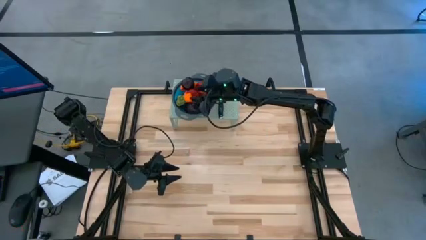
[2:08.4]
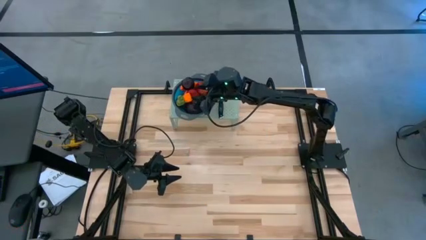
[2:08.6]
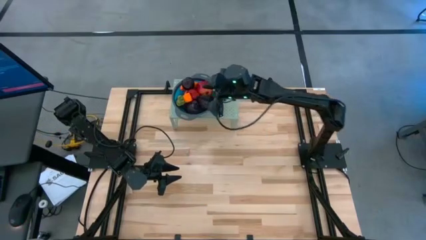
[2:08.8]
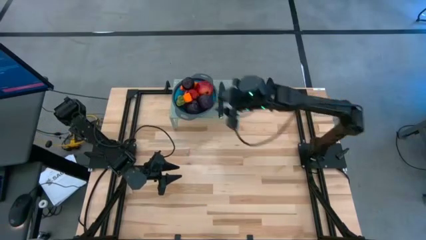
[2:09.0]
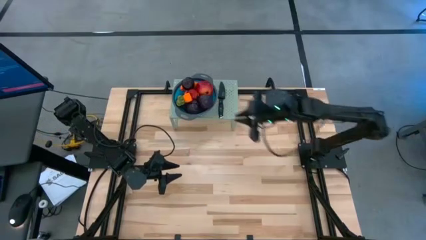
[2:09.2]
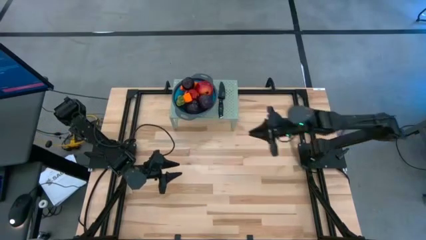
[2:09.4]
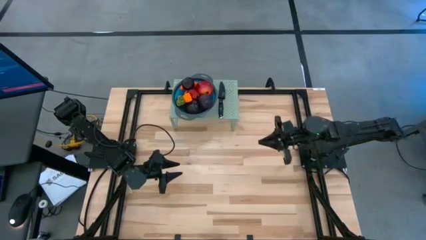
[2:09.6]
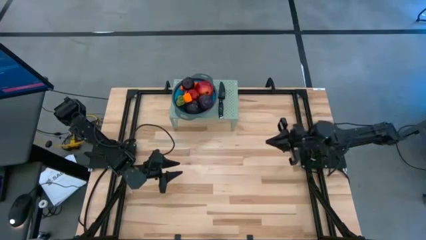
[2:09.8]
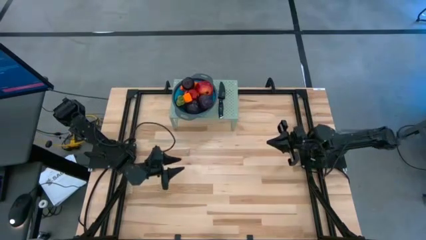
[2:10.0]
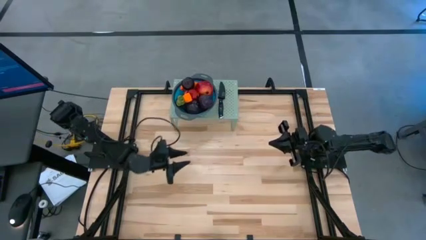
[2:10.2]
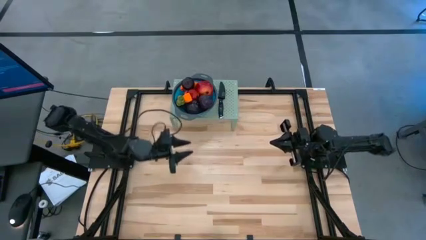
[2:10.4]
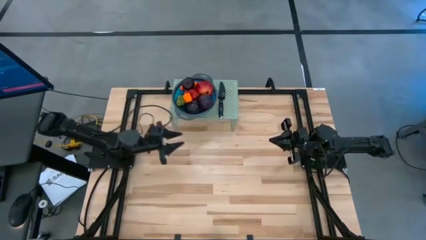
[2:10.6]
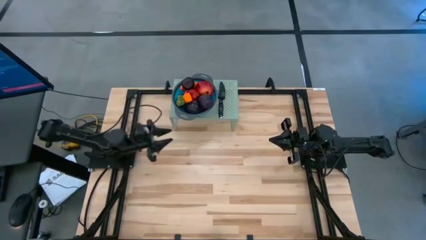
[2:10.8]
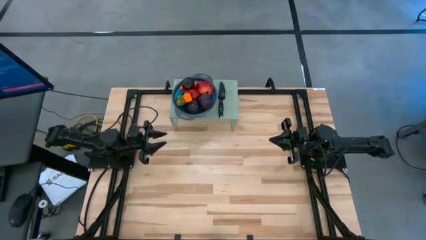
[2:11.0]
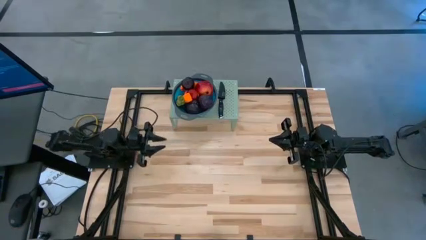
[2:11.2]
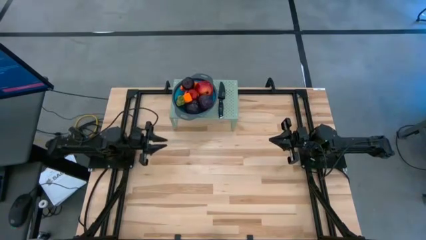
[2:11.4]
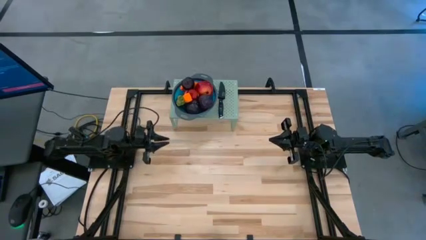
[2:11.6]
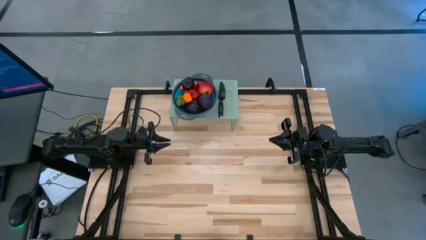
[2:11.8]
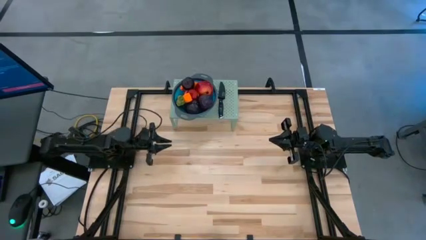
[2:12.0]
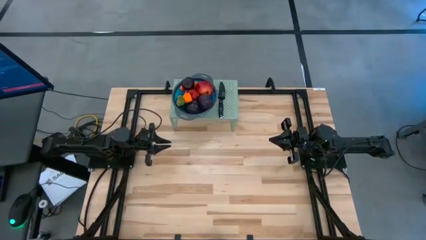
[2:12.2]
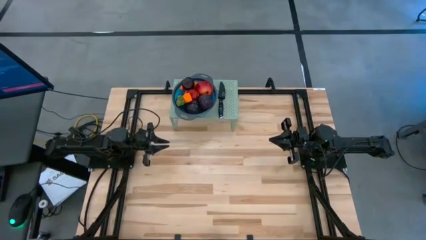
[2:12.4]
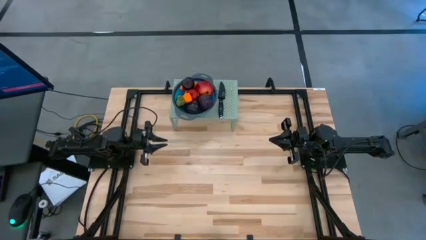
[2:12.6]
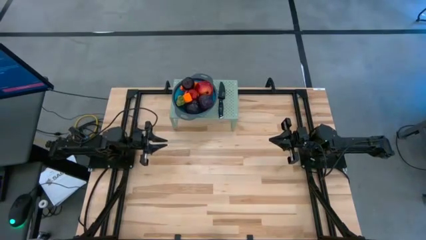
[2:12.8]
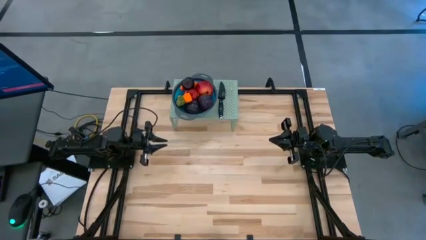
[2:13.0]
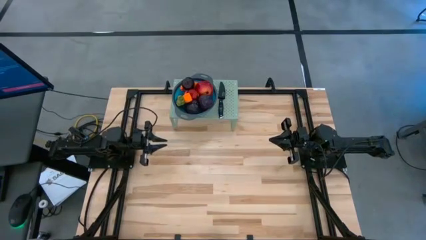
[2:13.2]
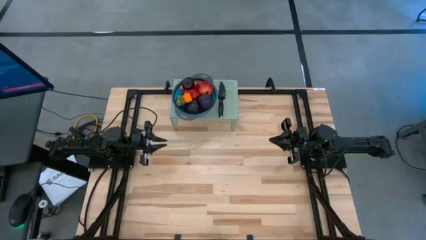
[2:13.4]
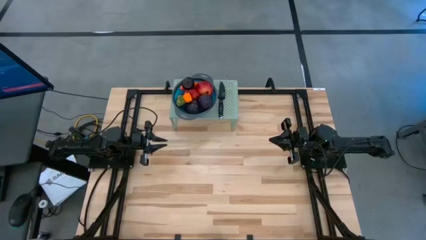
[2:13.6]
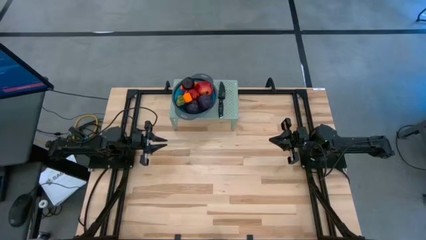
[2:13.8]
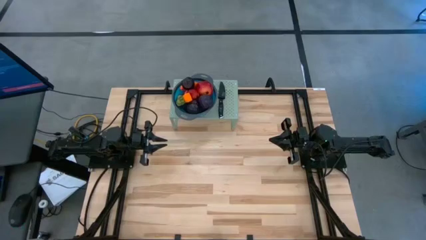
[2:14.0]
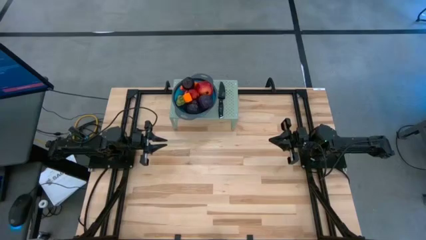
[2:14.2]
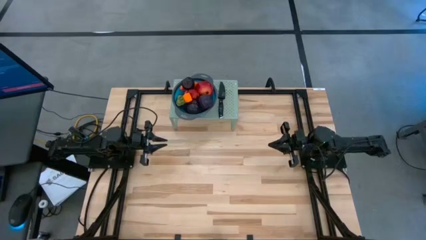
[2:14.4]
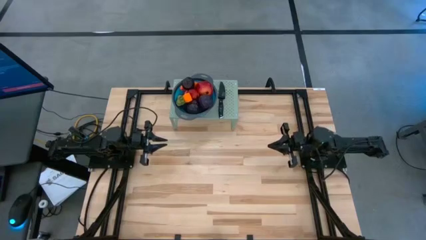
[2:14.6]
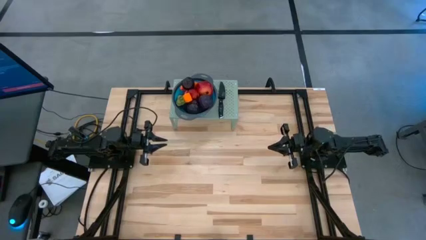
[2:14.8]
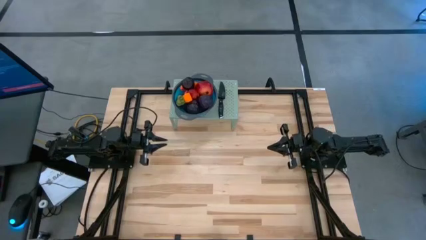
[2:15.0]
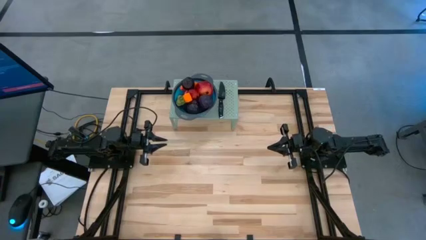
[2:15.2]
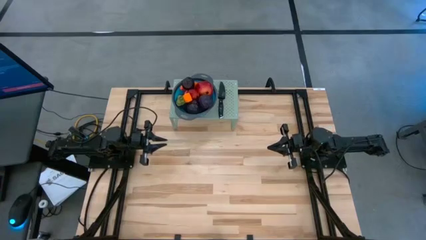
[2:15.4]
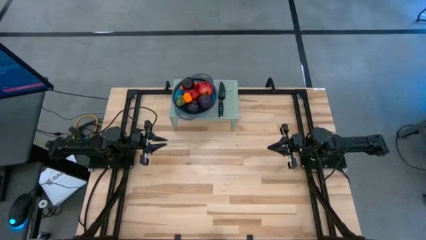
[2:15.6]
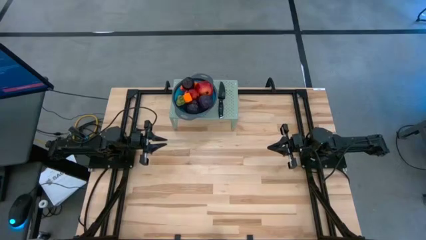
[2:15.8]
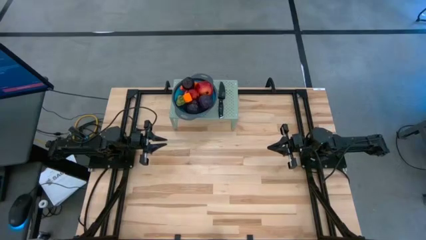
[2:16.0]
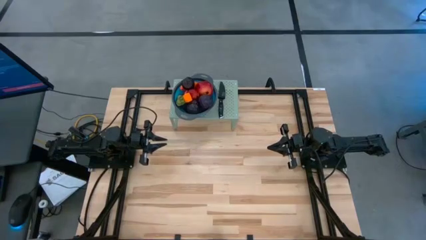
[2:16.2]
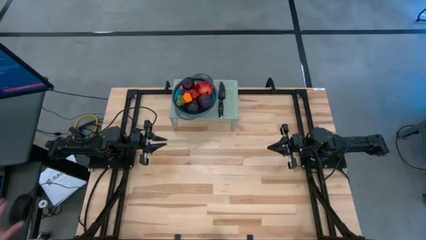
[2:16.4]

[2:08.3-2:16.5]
Task: Pick & Place Fruit
Return to Home Position

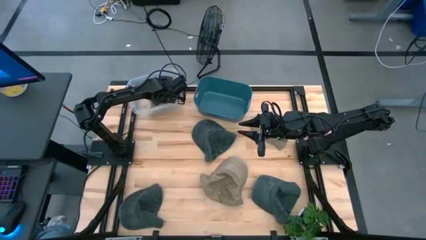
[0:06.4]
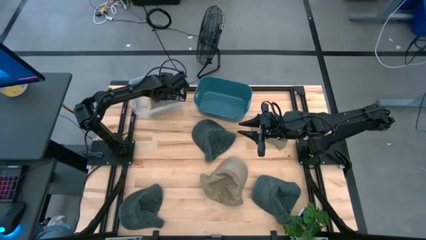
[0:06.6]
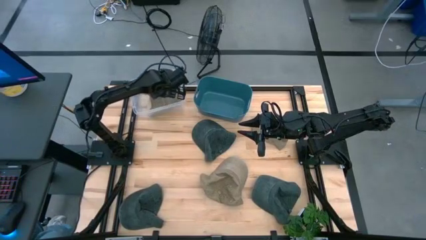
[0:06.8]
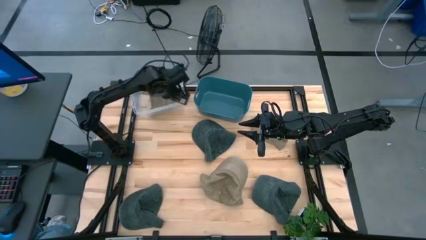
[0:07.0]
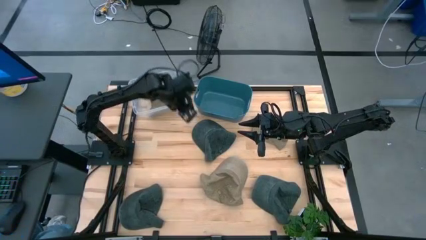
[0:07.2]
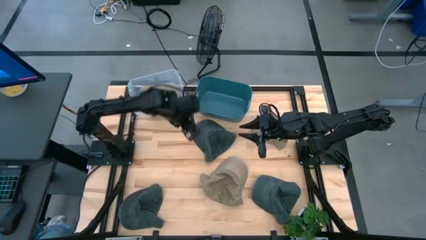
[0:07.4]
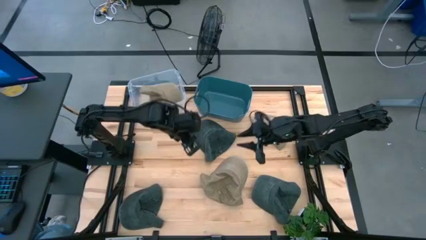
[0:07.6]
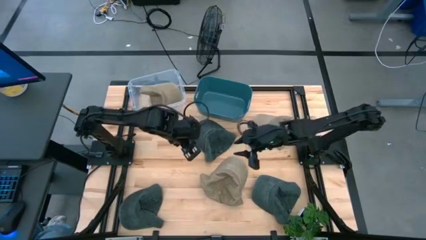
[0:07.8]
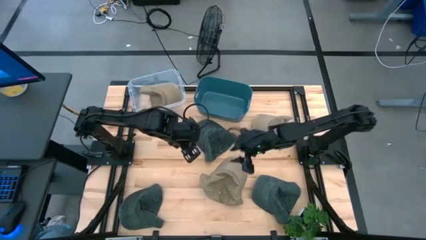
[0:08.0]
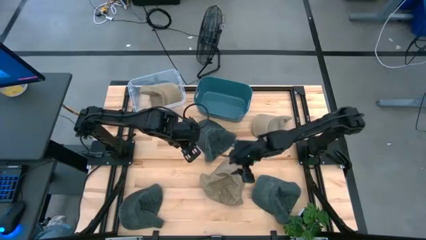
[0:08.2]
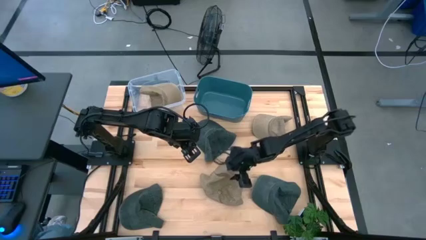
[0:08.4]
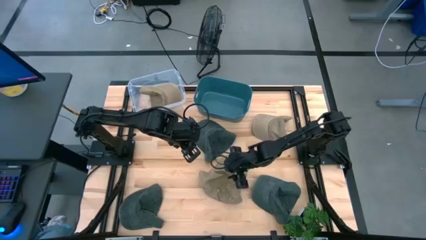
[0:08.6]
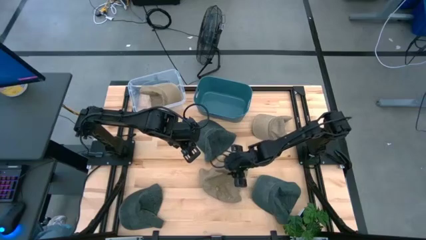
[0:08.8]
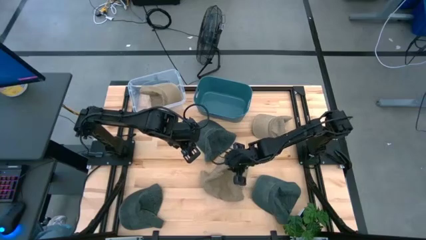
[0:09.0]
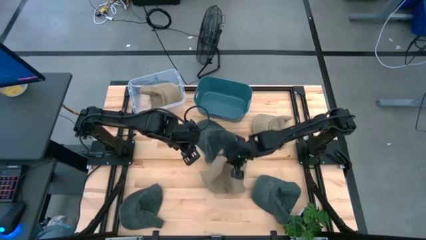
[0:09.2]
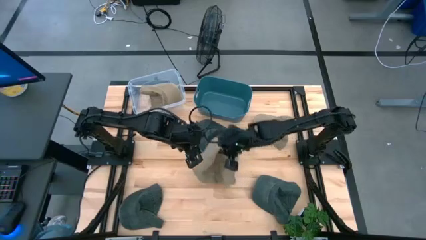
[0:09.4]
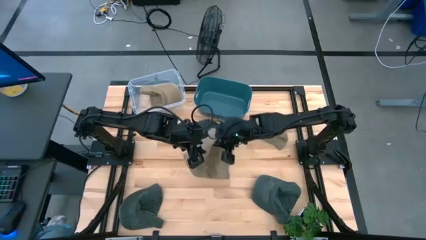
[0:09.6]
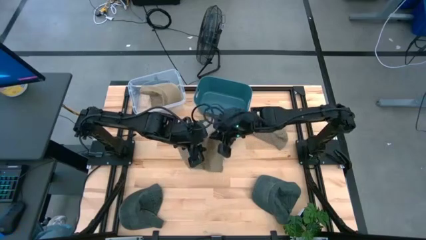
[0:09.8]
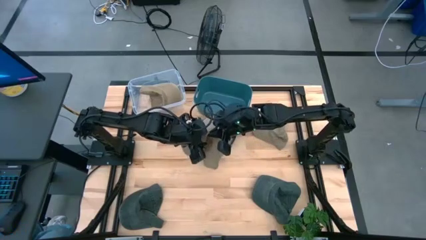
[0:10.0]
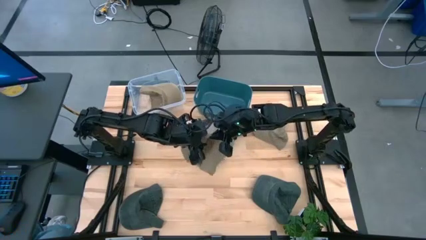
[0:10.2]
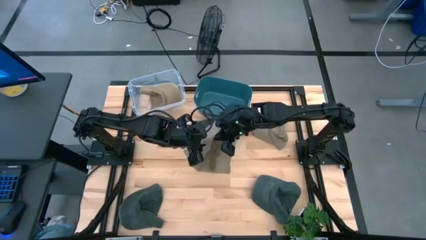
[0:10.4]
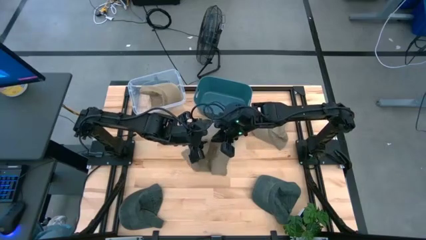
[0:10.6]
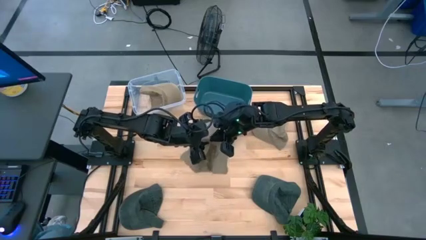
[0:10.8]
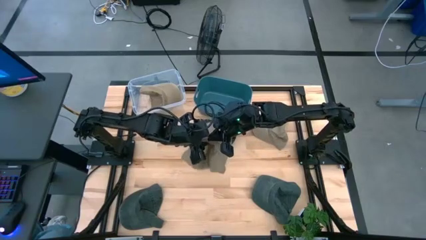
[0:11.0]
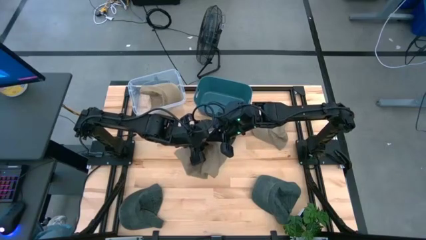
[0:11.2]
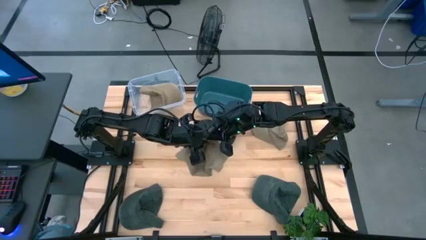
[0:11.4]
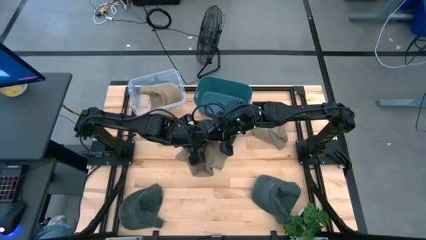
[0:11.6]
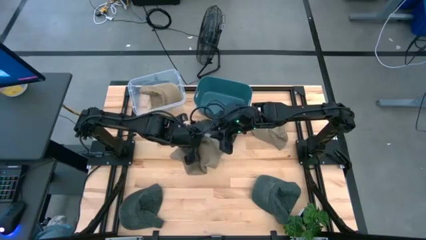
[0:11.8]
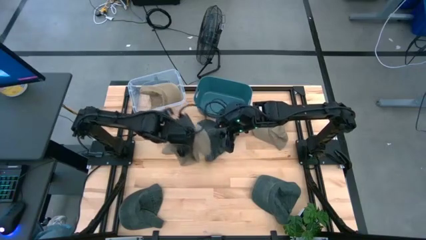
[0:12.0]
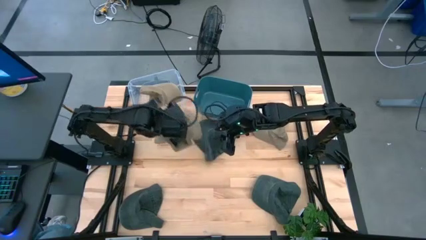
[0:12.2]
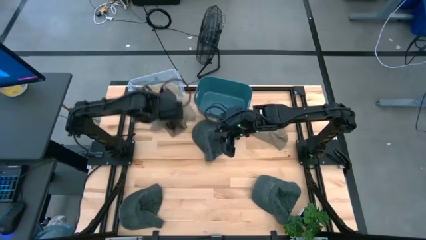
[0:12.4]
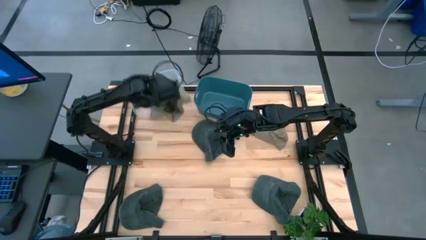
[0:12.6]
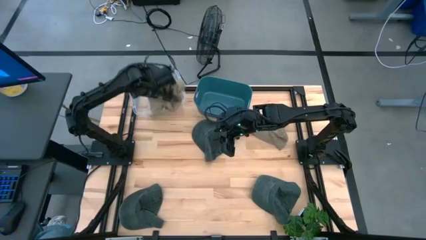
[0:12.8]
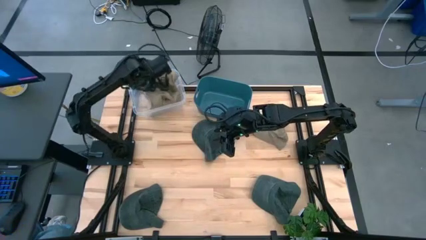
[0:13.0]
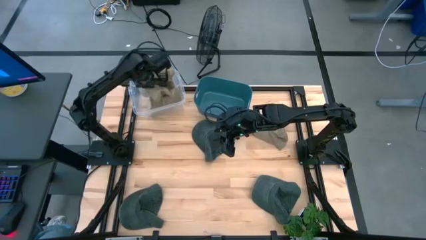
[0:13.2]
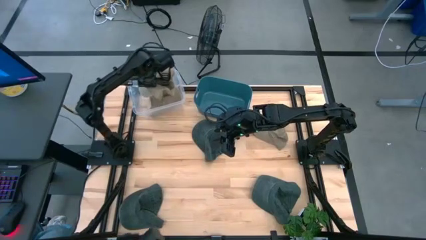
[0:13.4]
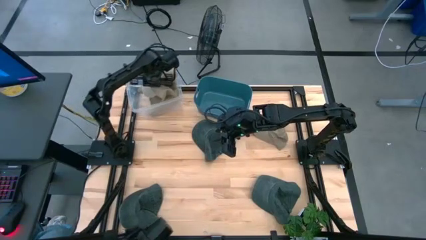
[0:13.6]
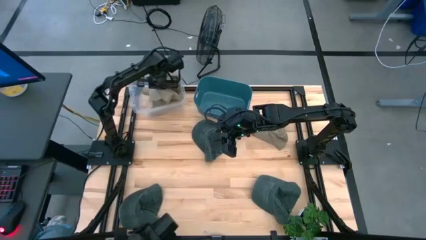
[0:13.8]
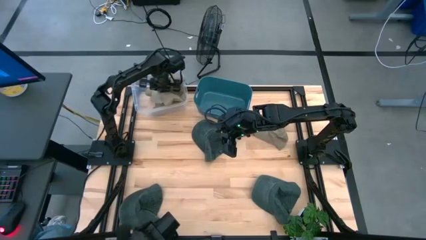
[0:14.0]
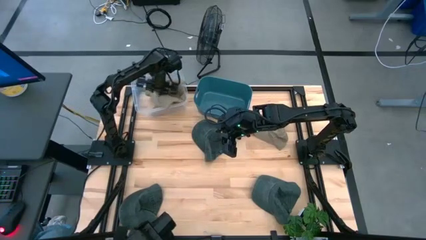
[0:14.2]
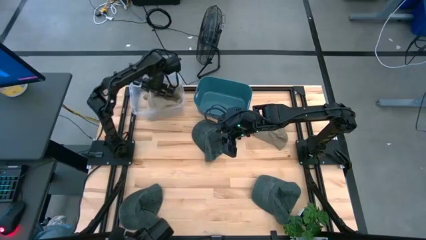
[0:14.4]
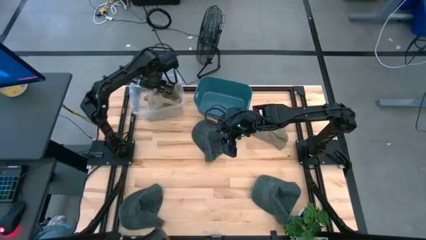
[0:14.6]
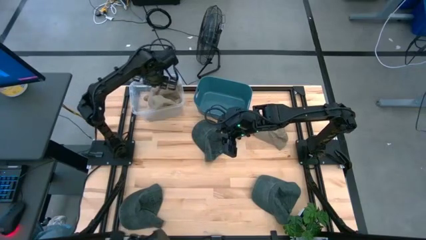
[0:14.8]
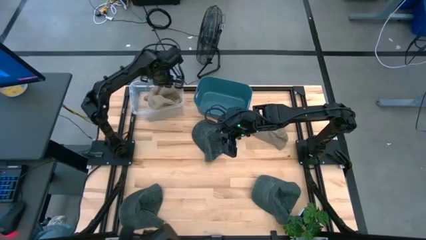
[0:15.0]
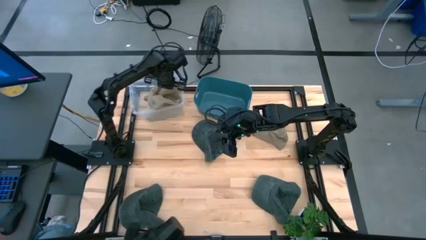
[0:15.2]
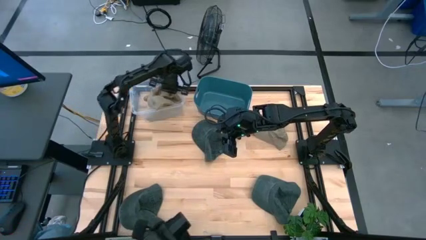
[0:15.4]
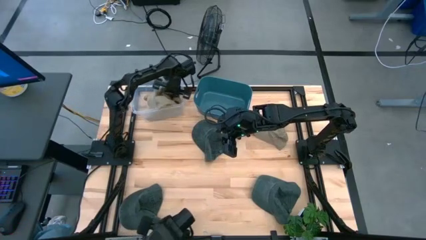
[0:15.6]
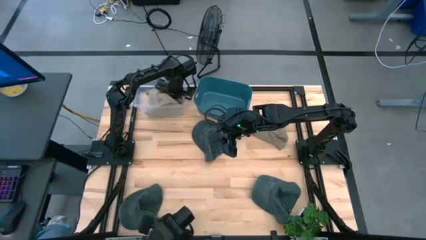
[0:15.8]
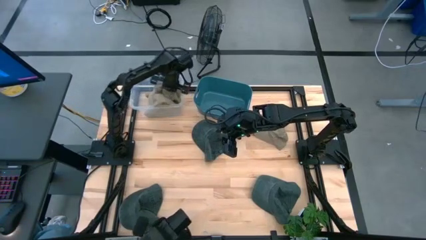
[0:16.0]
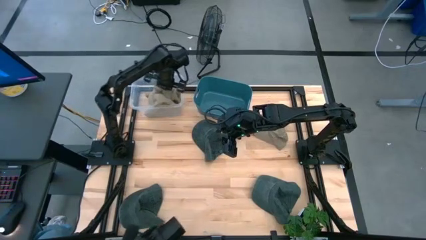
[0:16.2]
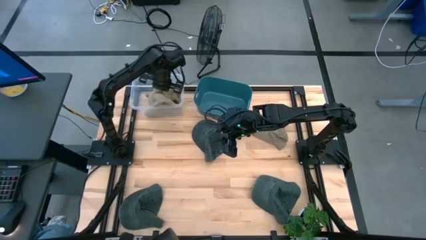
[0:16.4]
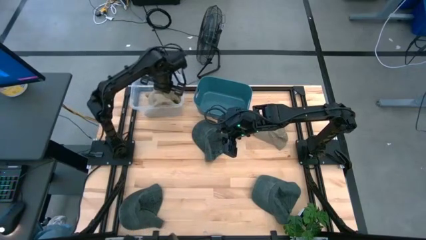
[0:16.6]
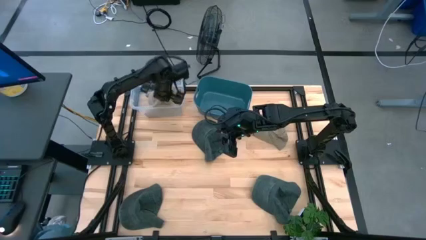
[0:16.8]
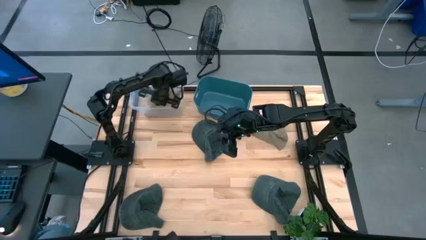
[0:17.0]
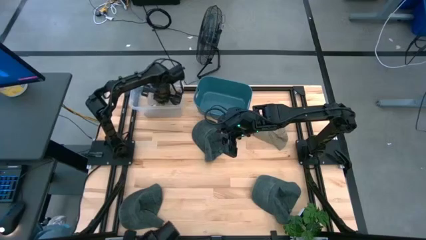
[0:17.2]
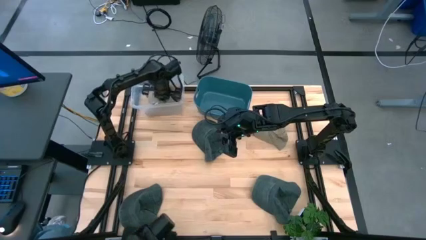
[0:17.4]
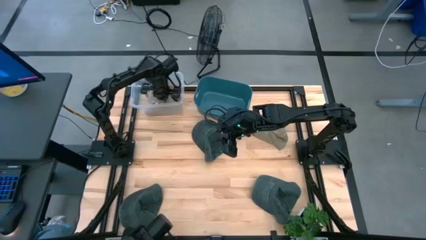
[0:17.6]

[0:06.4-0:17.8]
Task: Pick & Place hat
Put the bottom brown cap into the transparent bin
